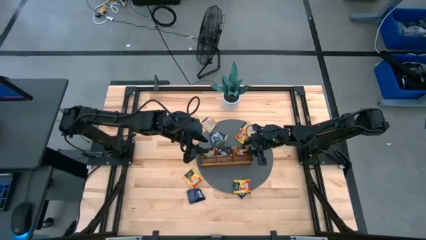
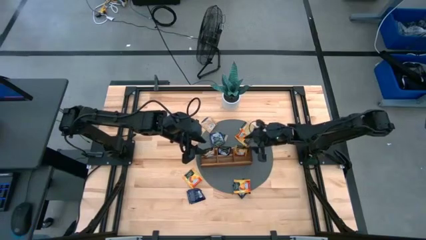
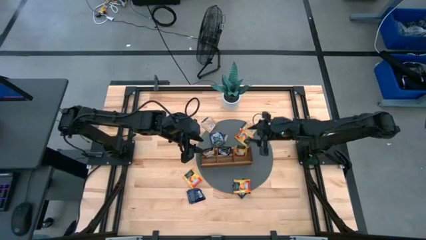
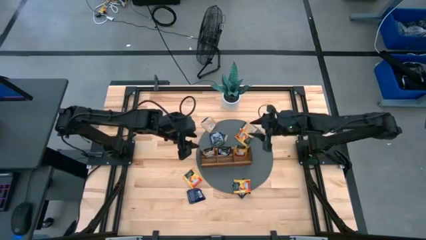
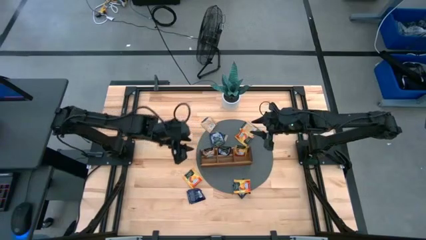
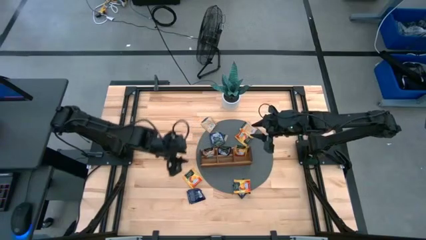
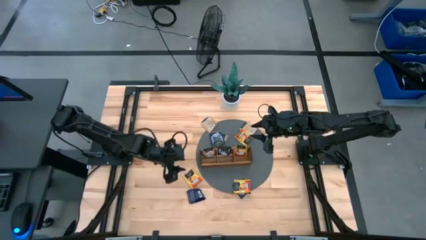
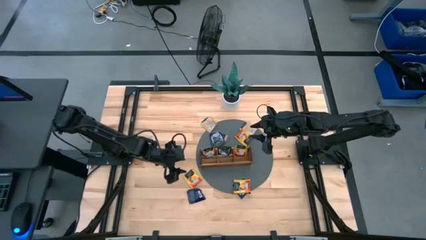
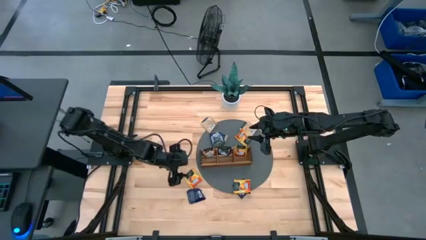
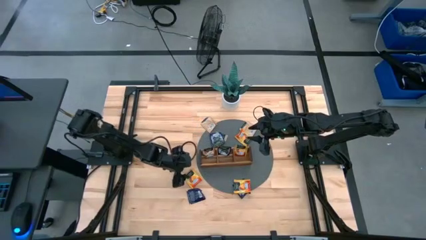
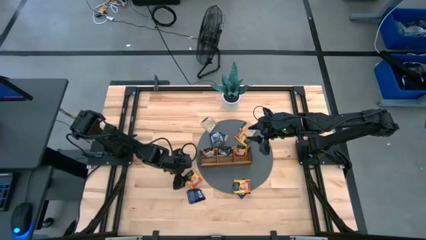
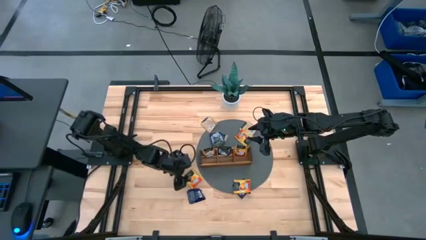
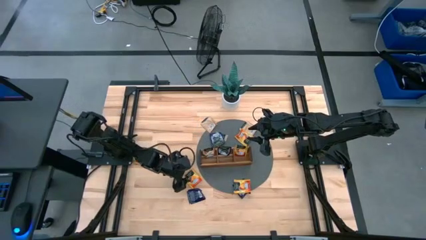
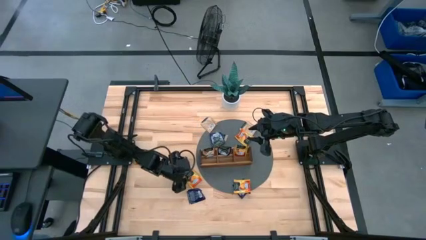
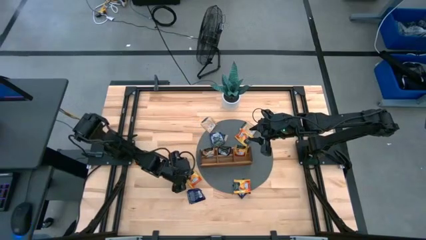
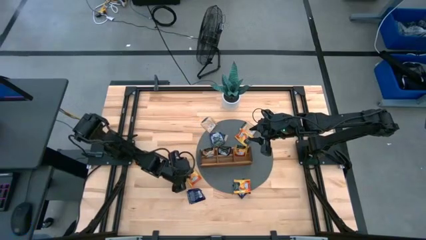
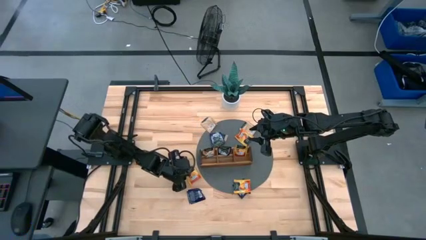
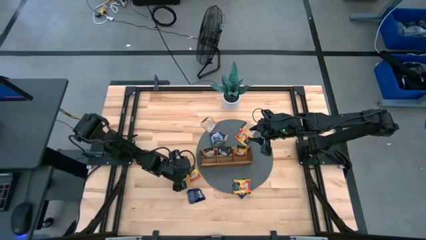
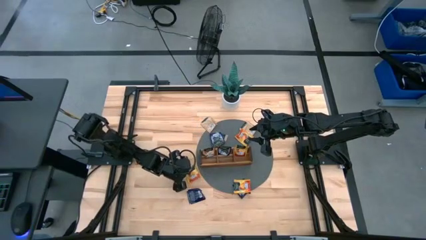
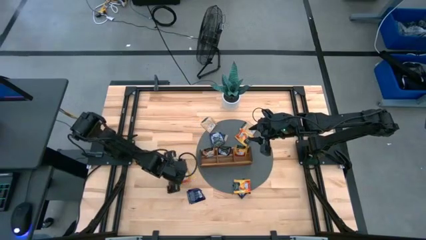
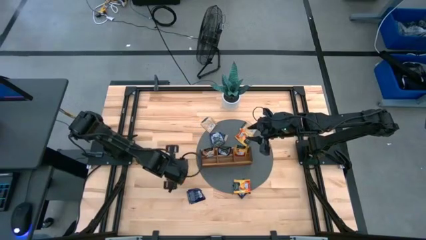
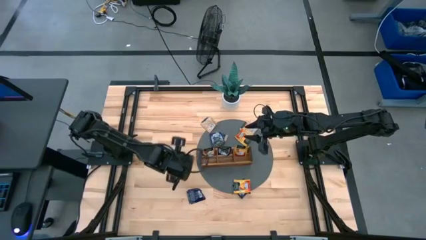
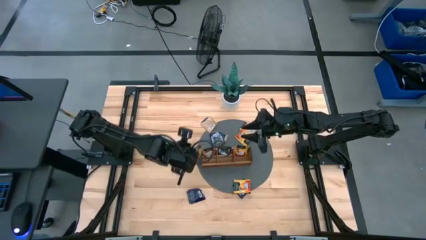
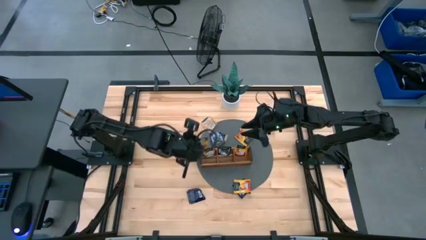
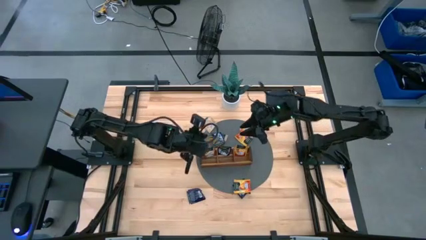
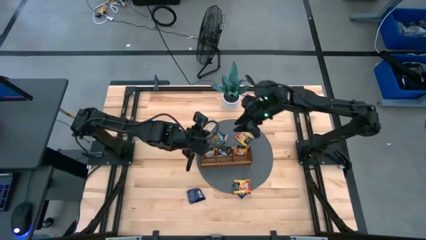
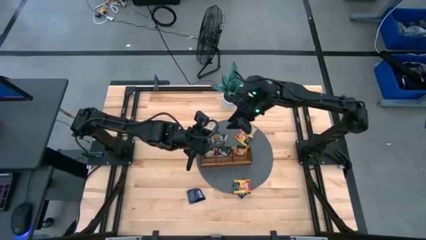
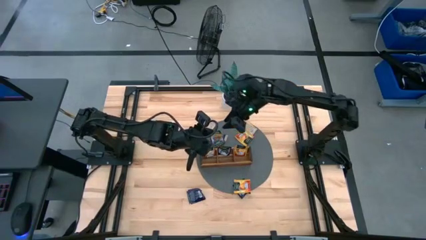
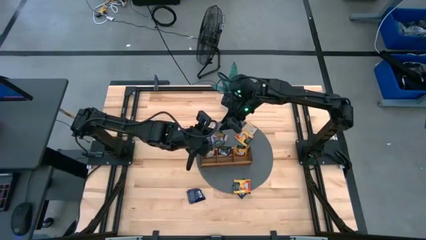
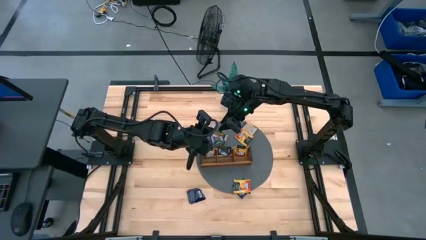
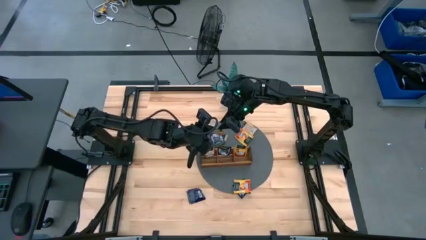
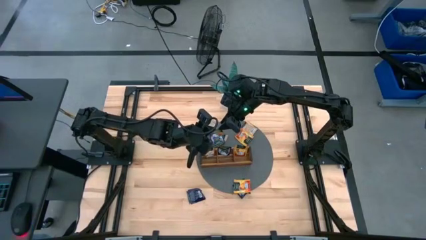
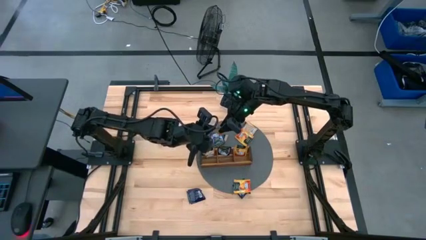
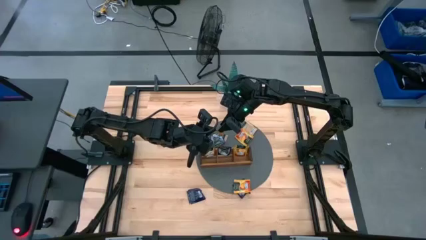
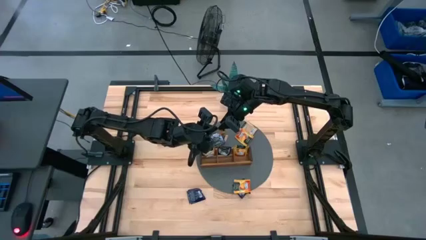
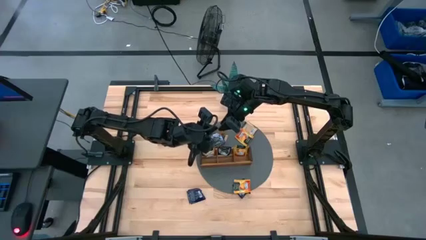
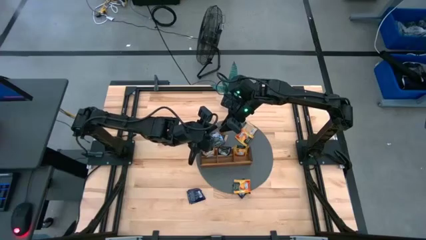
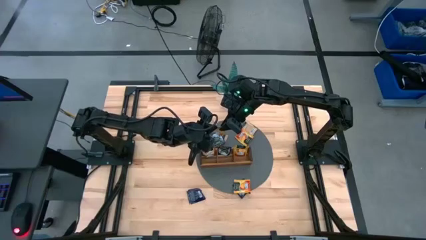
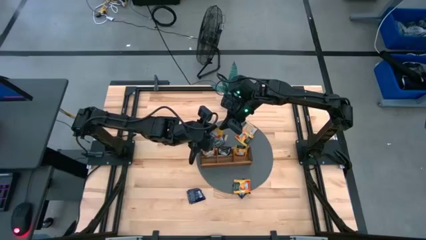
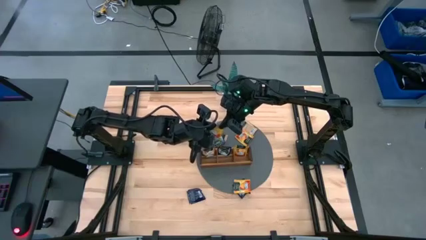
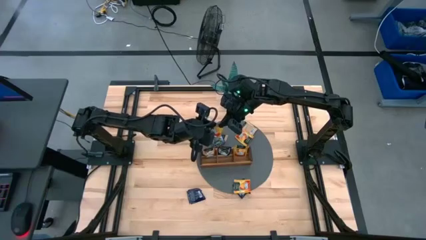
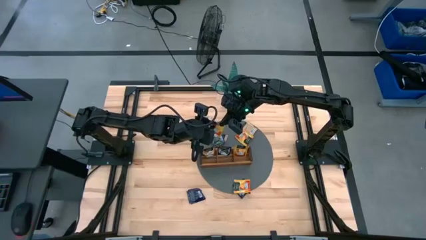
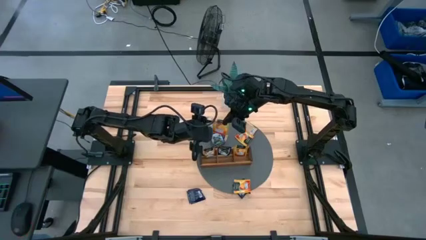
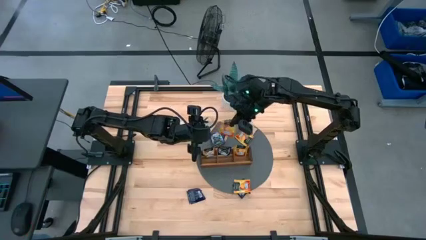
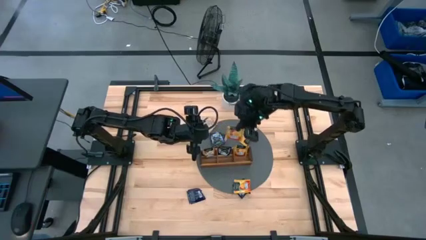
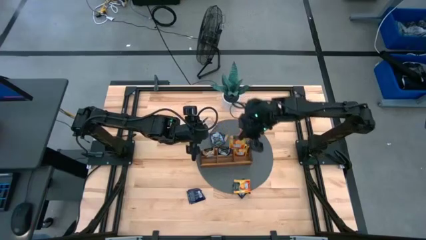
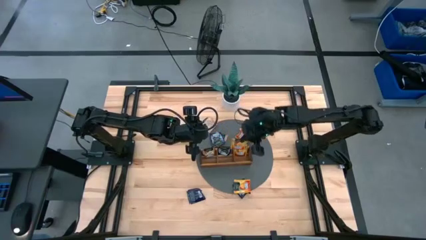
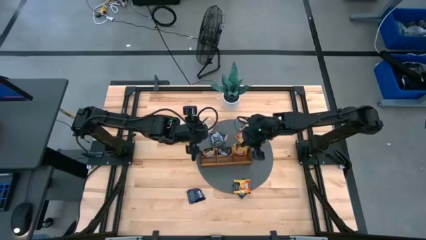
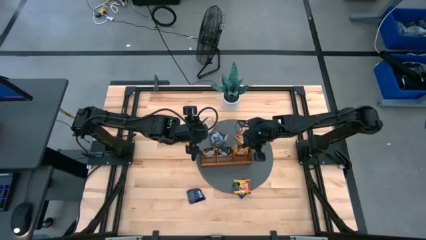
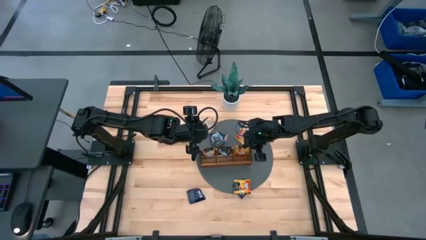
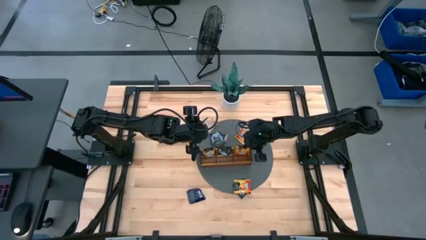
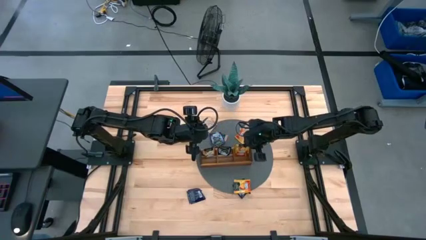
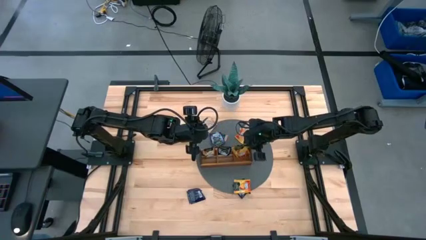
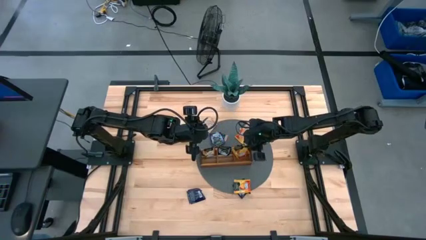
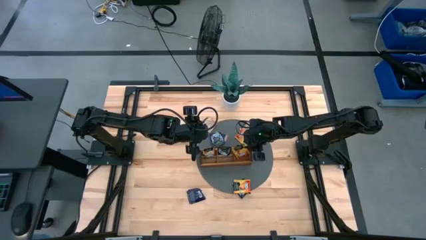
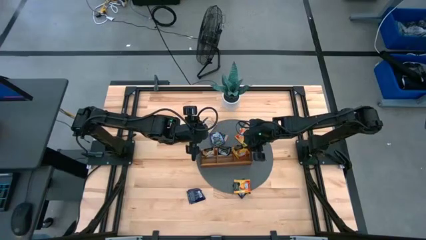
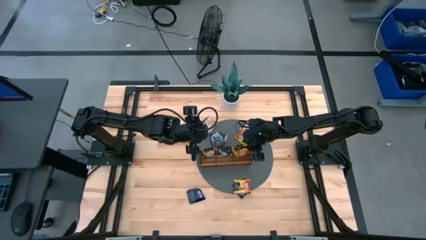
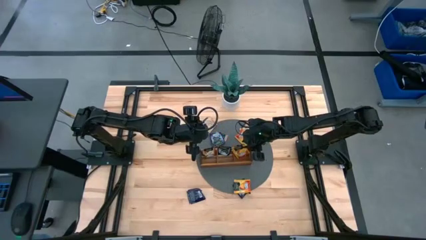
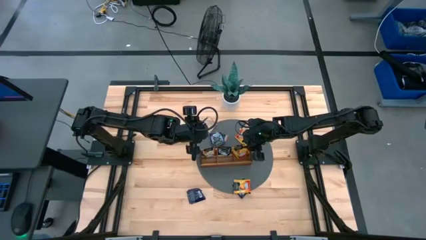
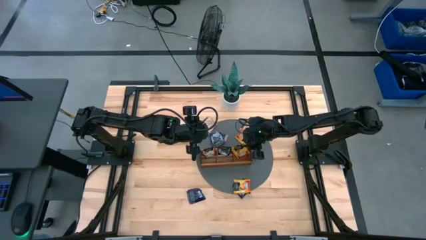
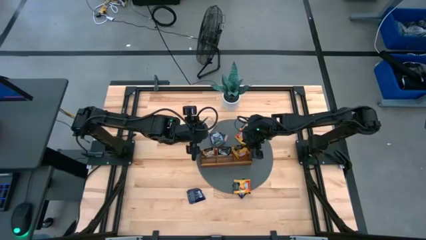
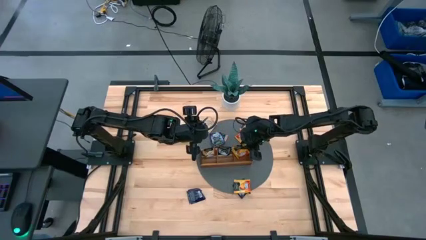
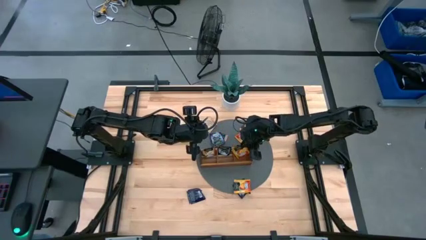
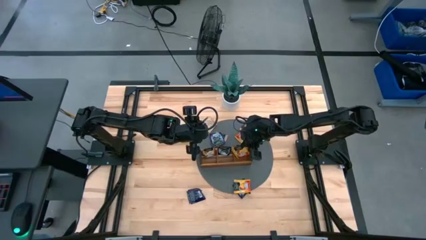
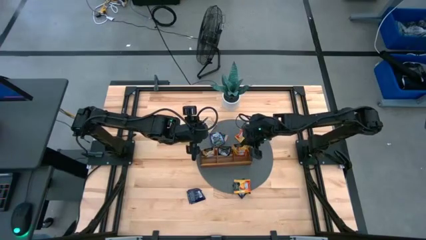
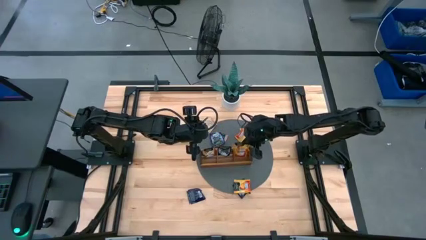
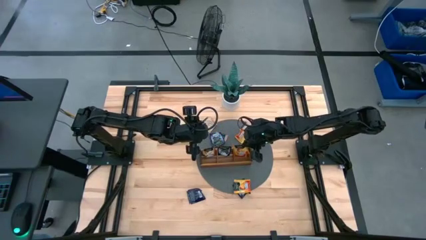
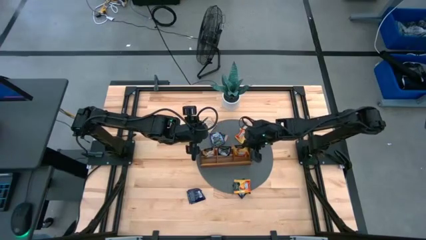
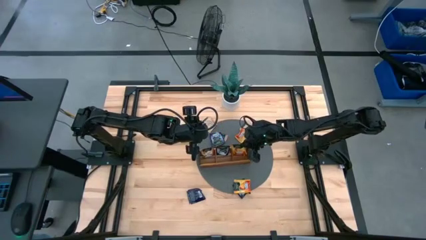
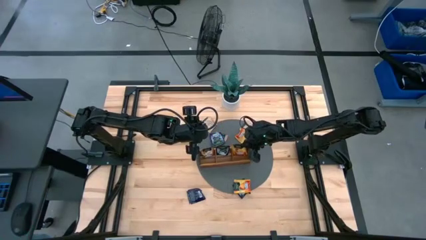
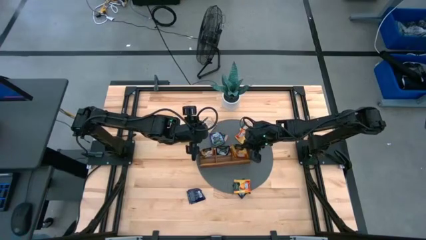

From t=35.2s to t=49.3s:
Task: Pick & Place Tea
Put the yellow tea bag into the right section of the wooden organizer
